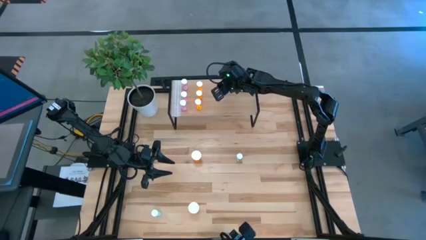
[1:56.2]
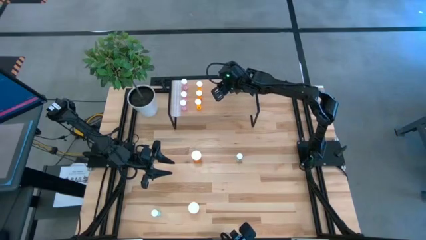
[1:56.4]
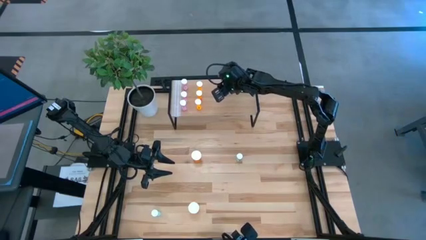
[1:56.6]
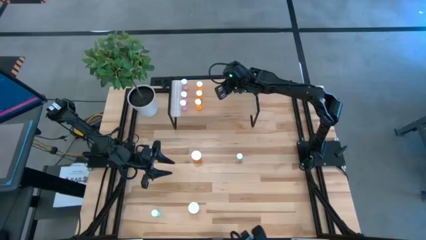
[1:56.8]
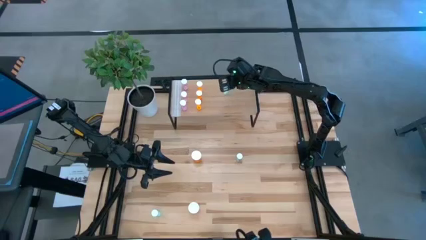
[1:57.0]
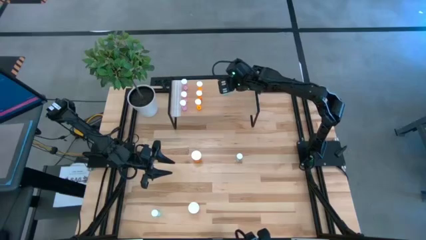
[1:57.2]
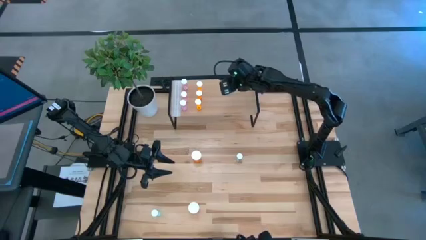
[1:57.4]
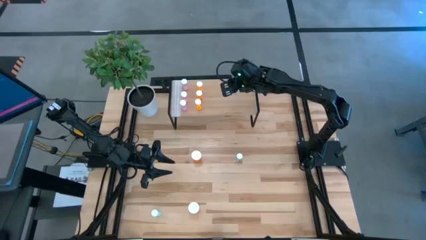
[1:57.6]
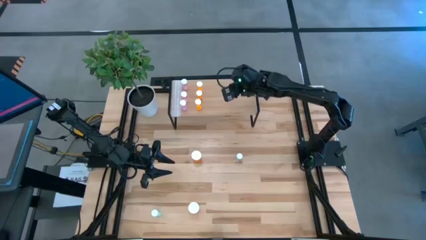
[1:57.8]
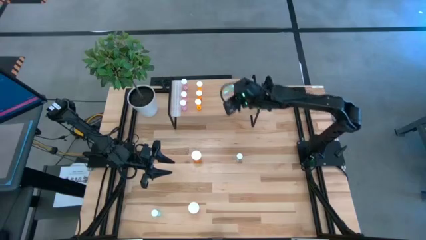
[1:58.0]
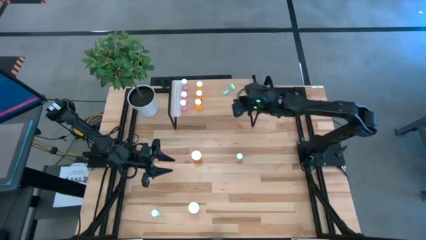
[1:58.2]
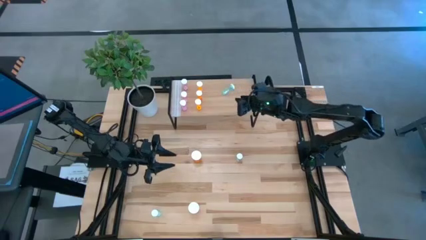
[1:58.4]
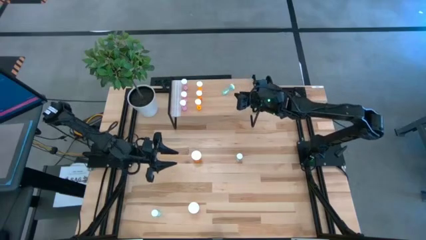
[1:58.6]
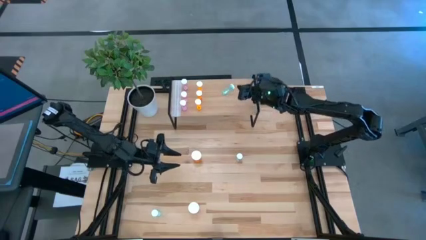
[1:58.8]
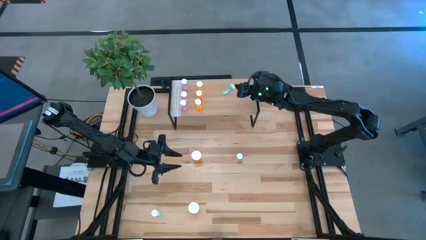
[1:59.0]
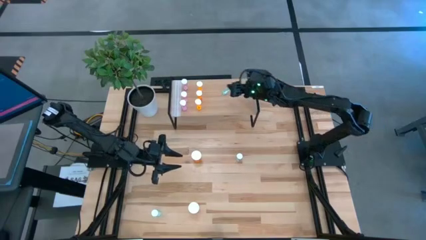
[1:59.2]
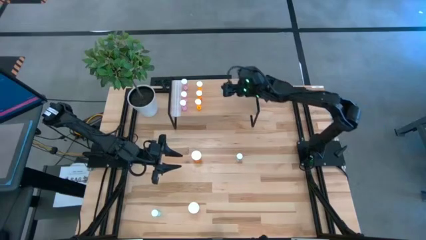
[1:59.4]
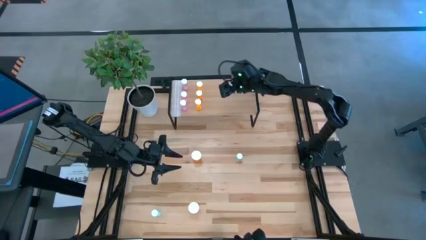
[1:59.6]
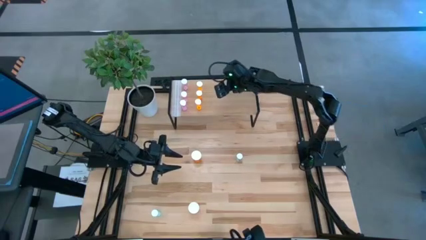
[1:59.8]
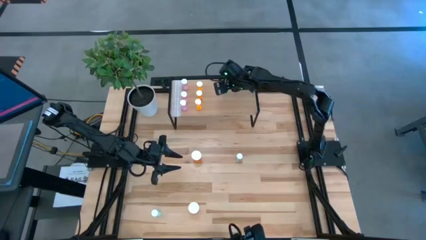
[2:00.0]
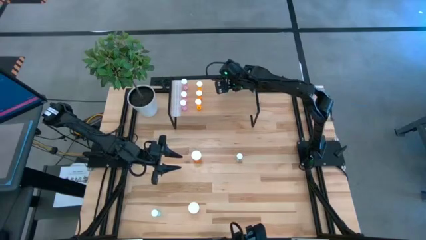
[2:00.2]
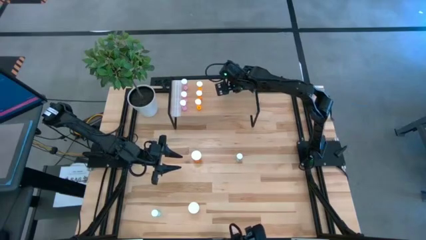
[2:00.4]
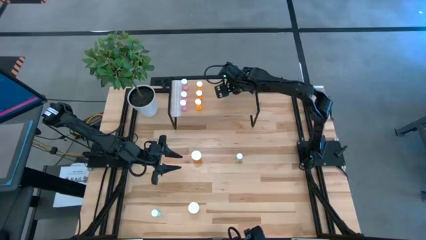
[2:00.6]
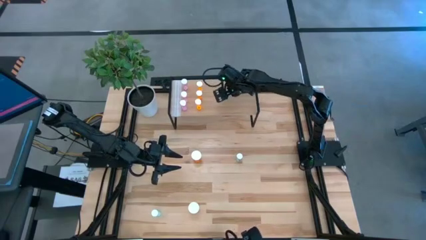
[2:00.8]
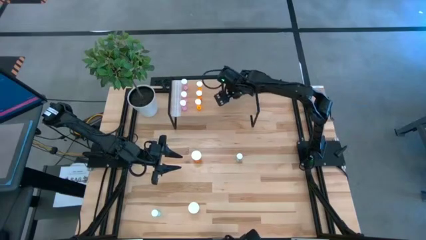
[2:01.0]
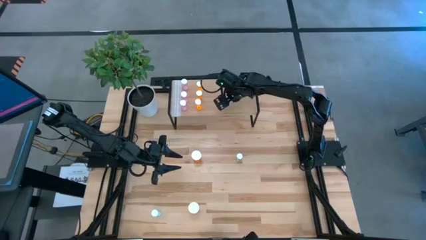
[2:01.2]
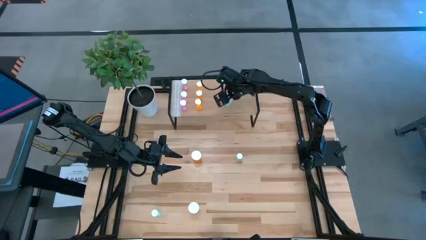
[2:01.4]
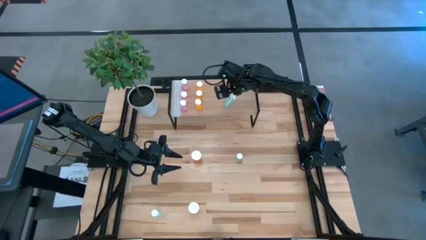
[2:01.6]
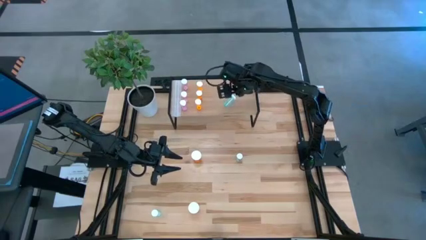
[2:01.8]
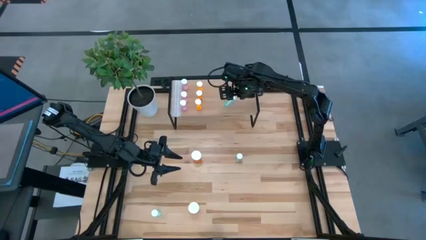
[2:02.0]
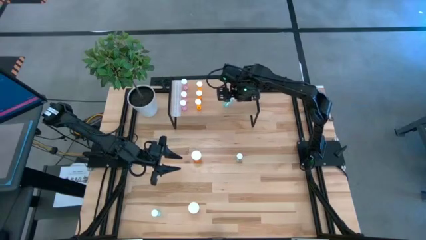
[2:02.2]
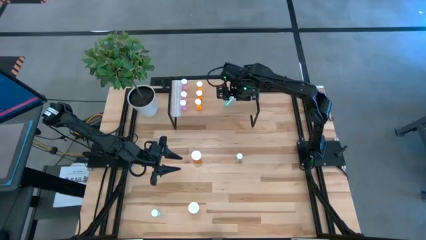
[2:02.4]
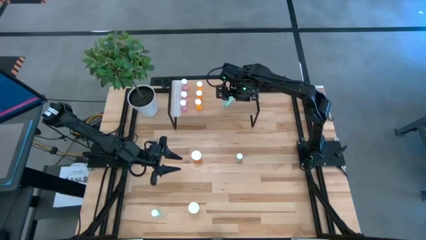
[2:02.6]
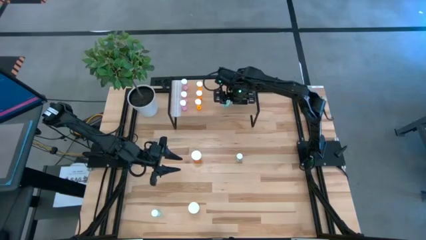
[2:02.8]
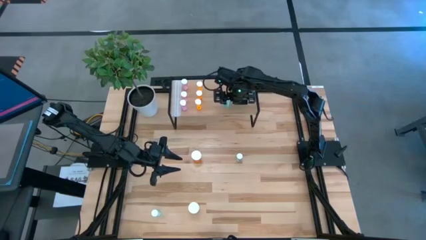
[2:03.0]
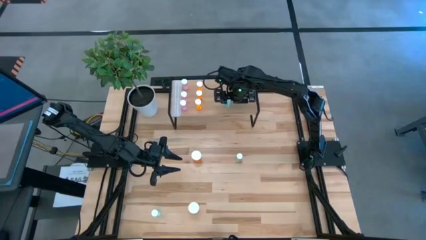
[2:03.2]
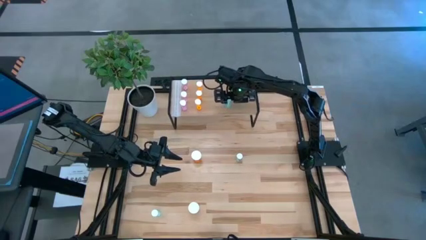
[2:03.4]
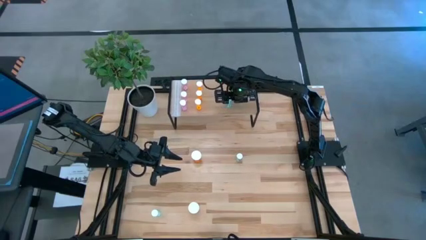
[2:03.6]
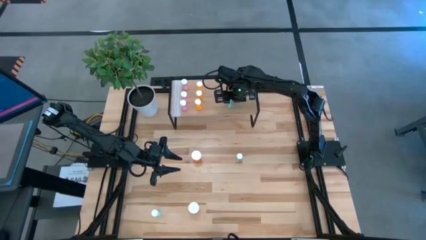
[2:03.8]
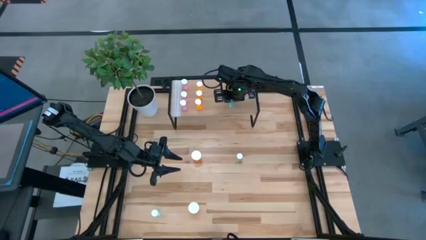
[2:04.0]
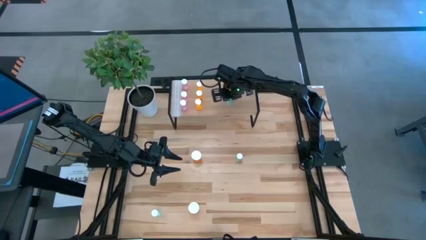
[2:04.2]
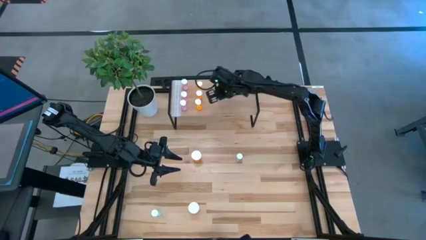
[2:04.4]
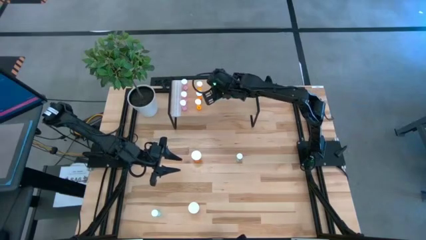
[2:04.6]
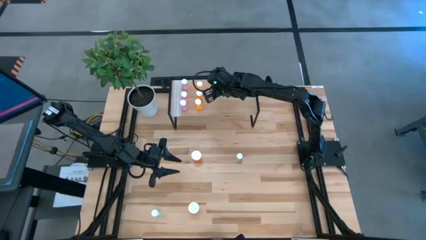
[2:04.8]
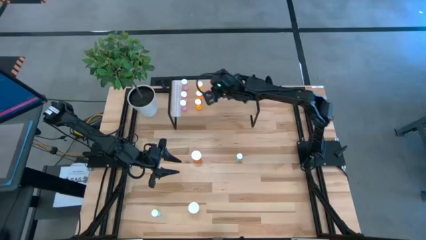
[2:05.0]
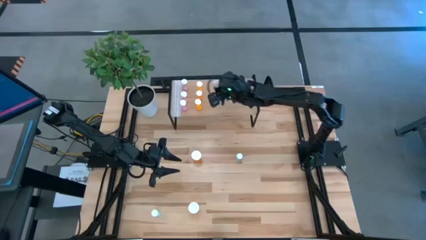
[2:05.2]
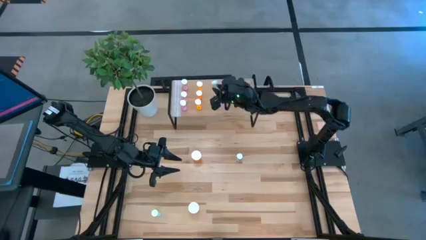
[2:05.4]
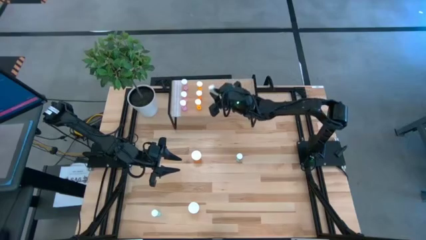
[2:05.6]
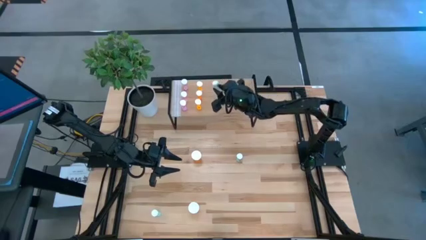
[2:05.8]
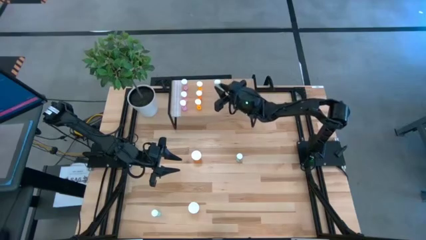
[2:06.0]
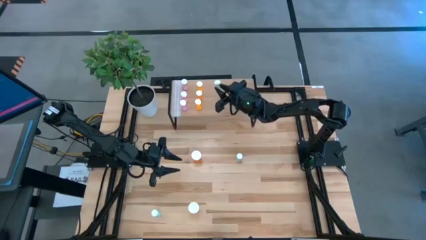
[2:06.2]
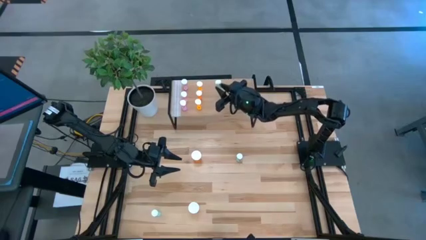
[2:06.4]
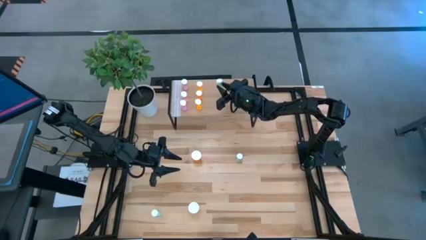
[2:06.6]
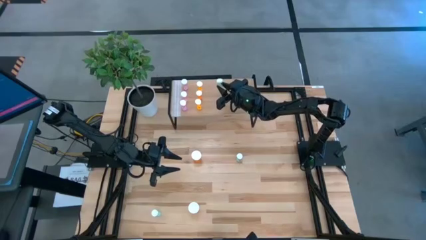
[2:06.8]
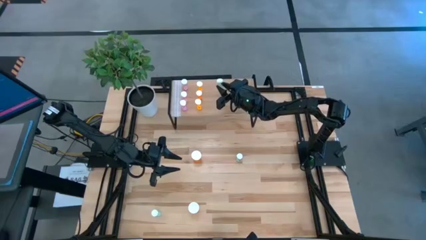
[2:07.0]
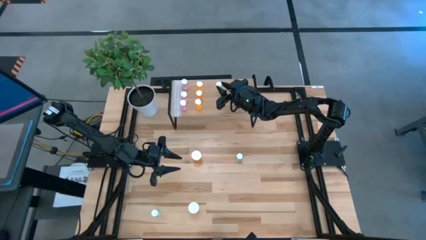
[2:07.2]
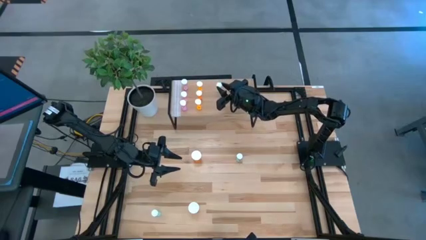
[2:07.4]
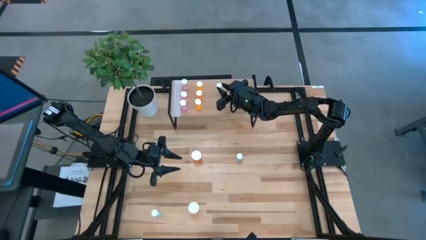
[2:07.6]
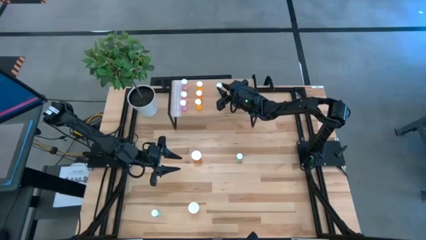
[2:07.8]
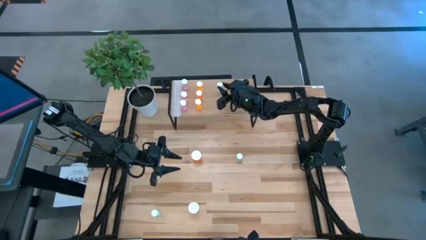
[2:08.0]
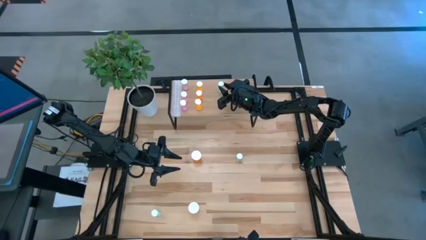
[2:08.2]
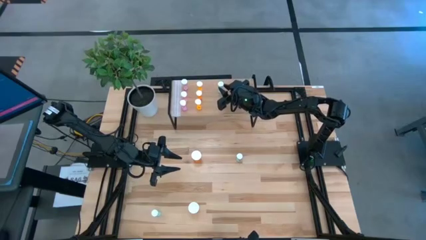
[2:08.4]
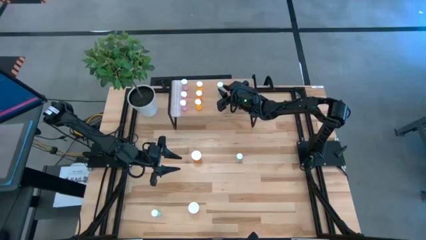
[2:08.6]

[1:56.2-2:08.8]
Task: Pick and place medicine bottles onto shelf by color
Put the top right blue pill bottle on the shelf

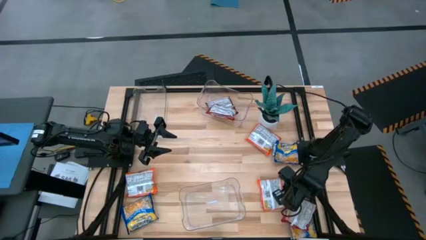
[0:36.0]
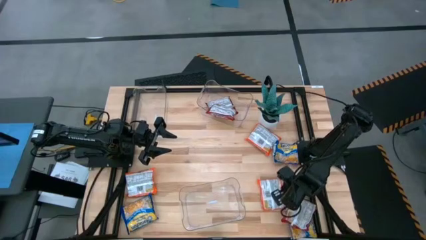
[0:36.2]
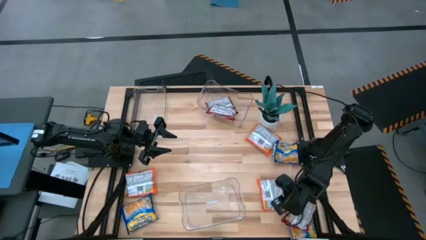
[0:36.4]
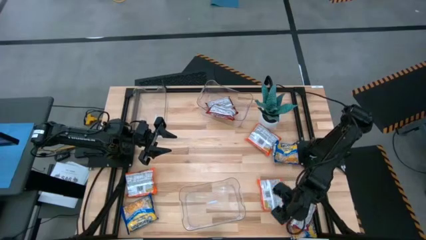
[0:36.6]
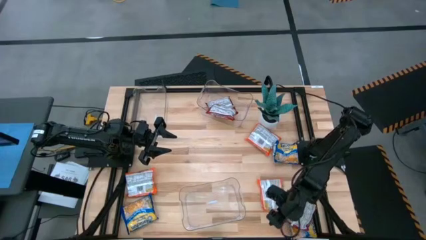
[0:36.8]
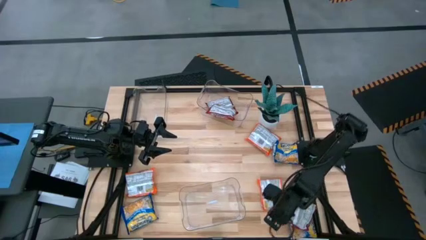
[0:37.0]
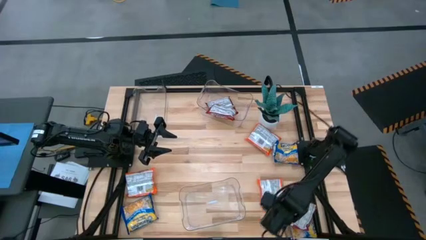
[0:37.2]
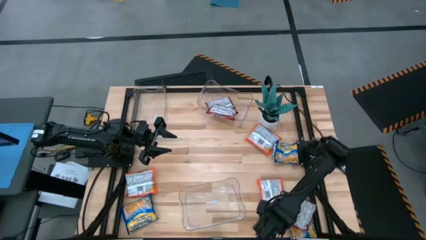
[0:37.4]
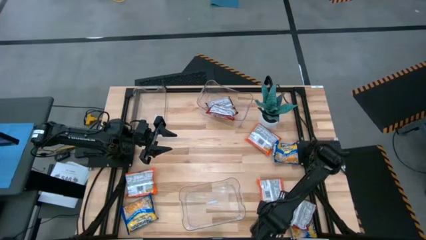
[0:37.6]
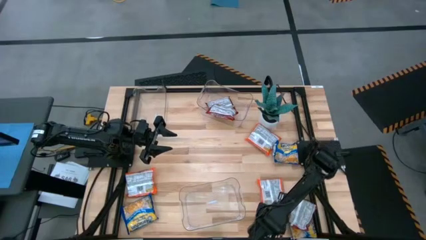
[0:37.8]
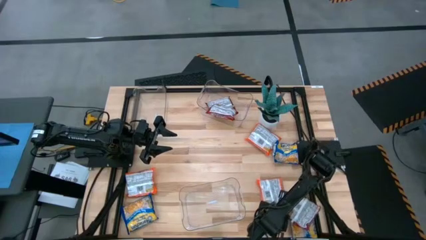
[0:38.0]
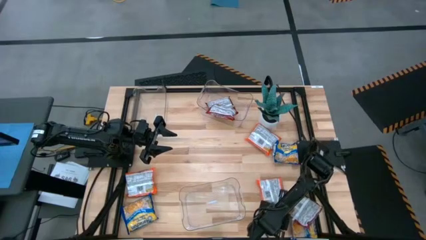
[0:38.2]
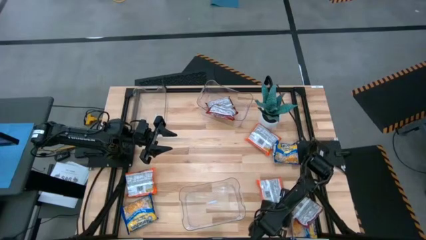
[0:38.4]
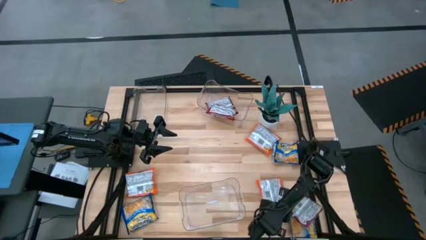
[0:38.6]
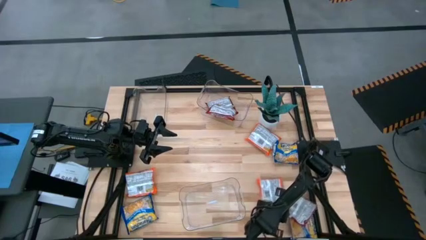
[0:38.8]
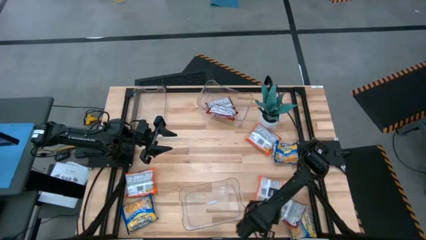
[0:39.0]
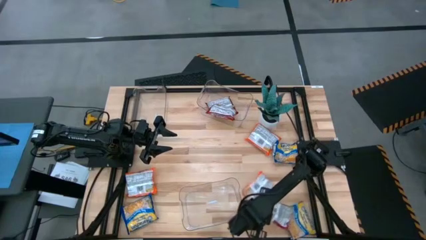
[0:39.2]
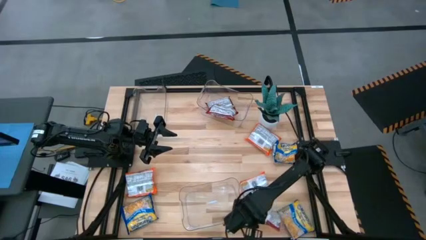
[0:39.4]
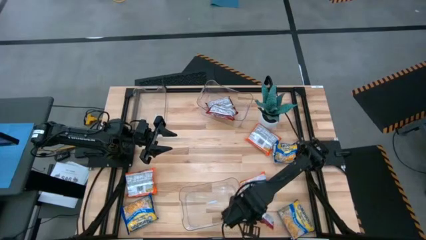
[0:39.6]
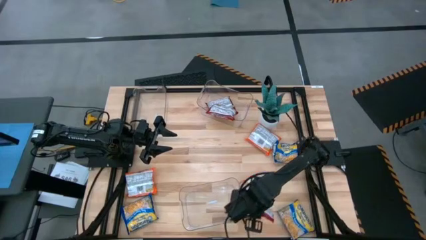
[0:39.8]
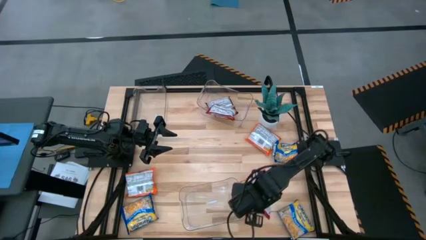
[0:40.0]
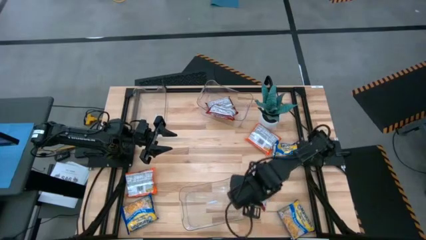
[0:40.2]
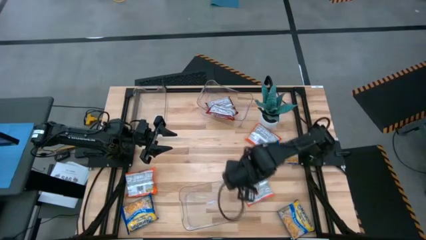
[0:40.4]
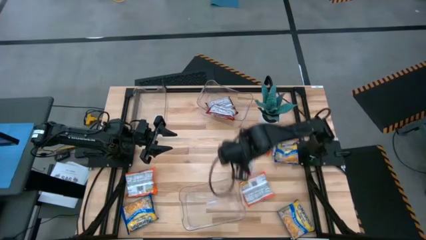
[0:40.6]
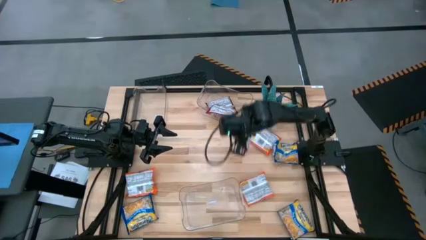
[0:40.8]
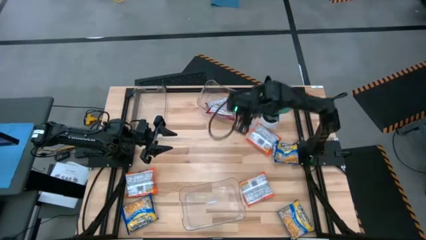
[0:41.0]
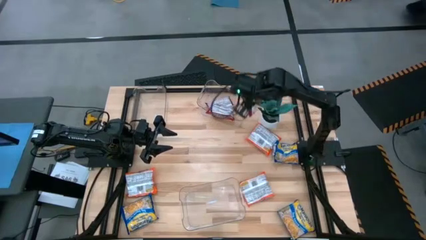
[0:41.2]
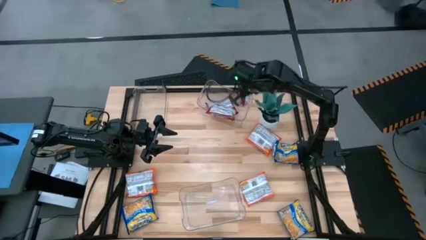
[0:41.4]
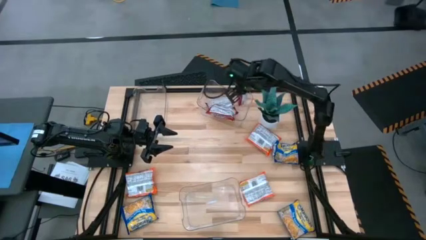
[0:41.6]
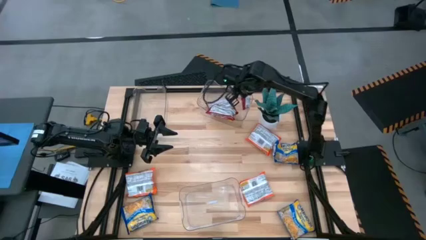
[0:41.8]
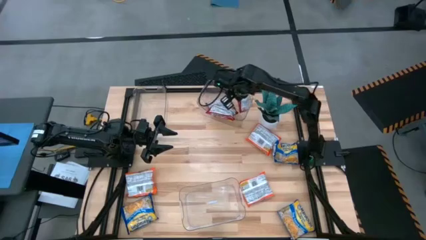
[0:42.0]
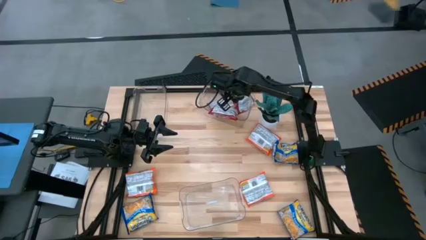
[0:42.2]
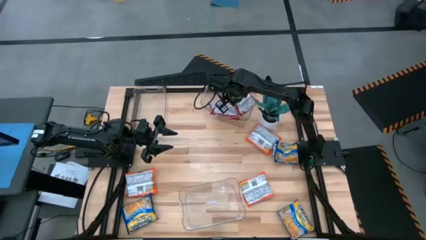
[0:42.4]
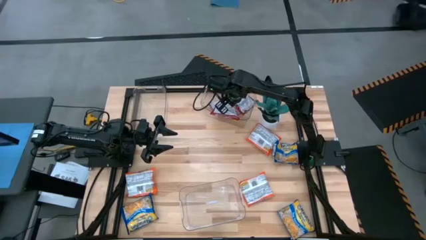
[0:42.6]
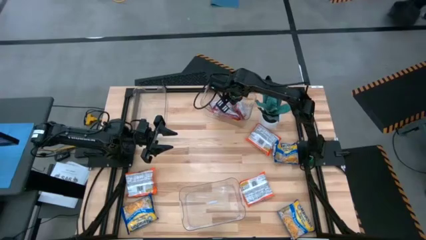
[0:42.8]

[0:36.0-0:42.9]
Task: Sort Maruchan noodles
Put the red noodle pack into the top right transparent bin
